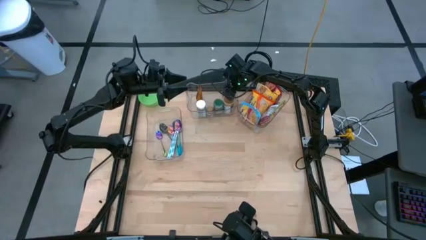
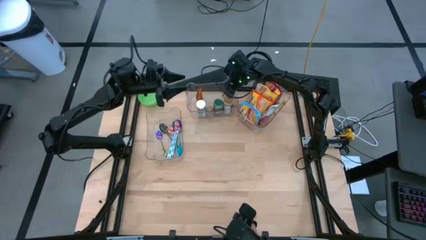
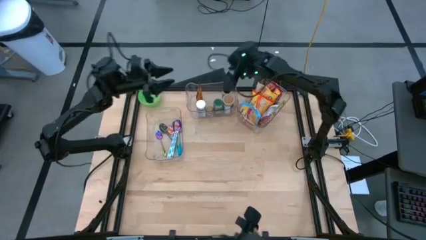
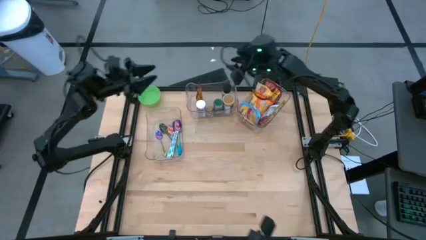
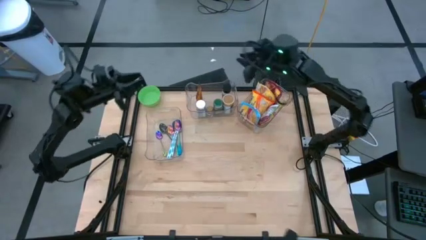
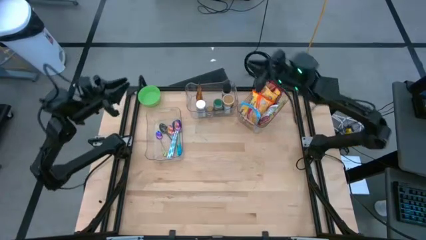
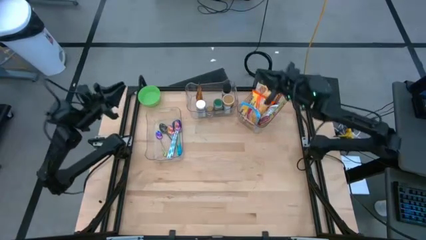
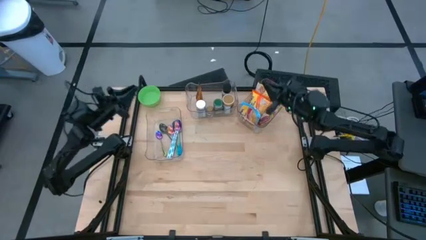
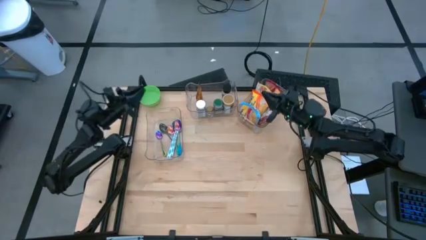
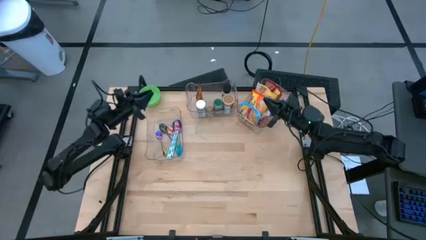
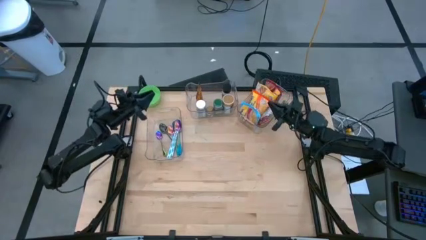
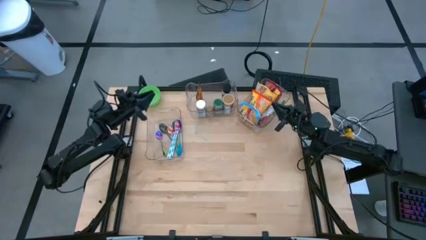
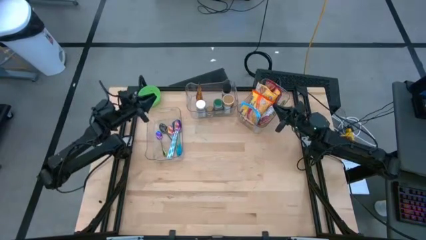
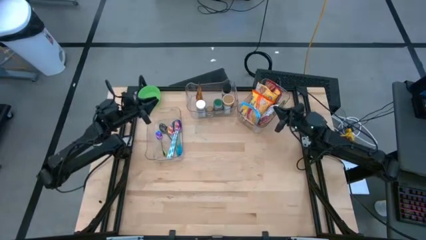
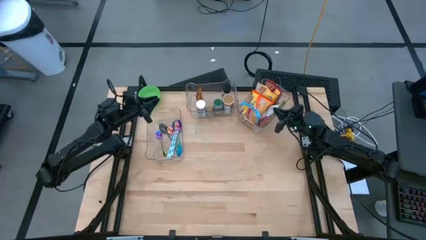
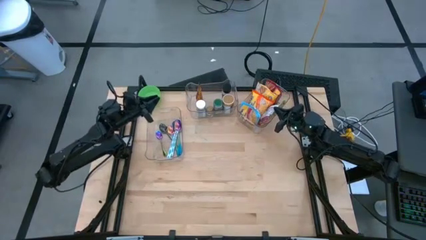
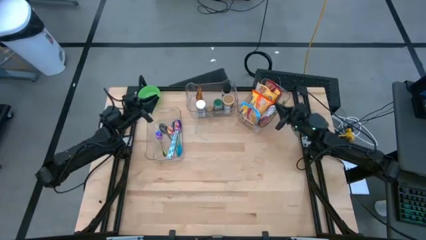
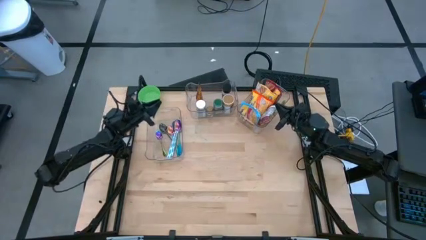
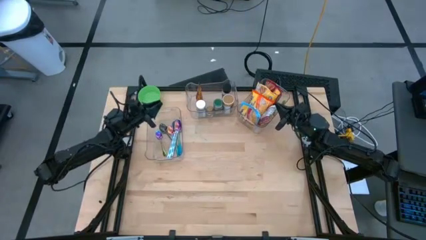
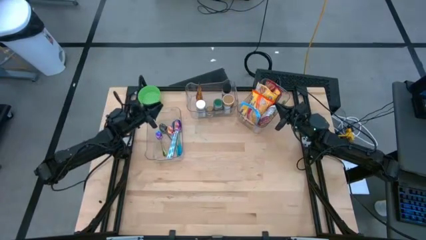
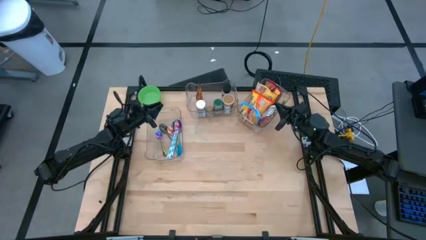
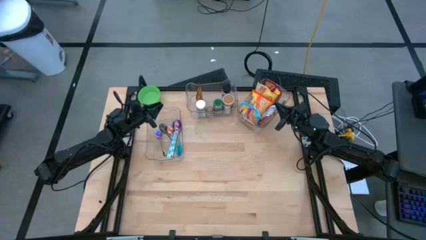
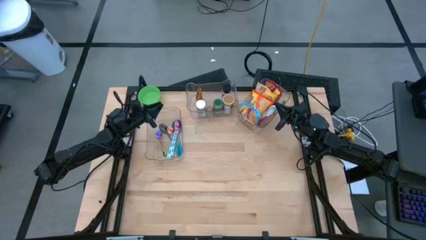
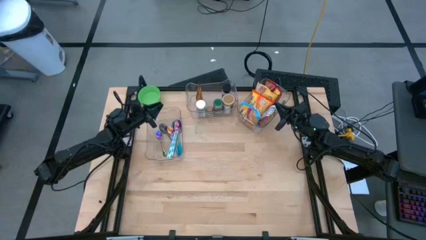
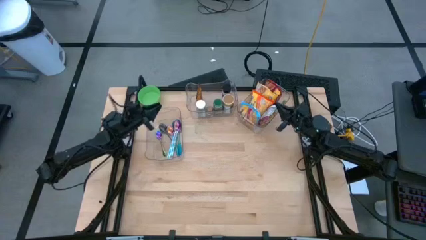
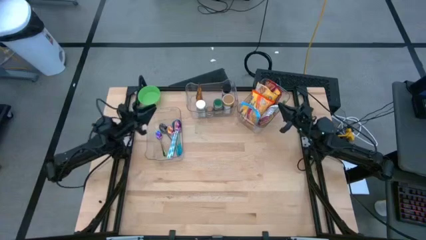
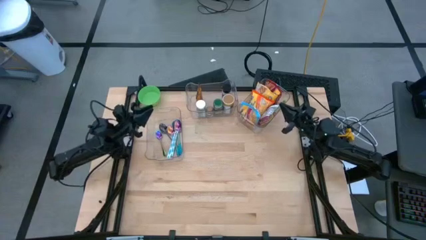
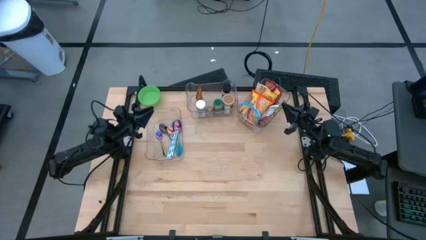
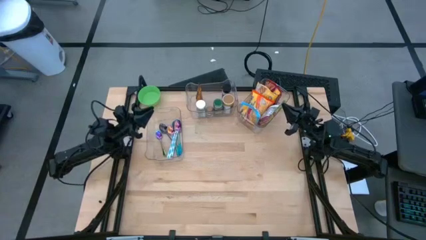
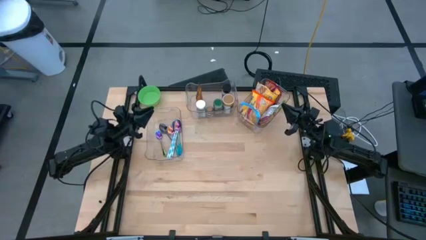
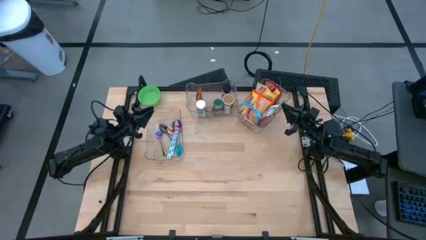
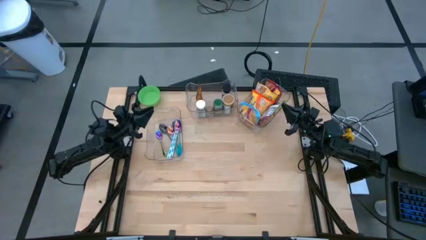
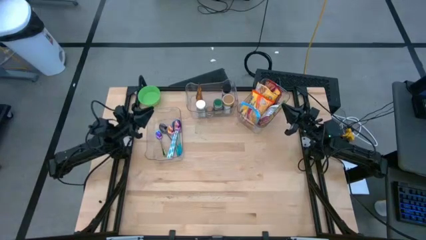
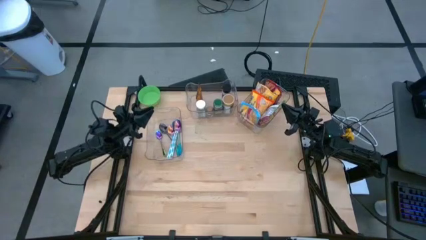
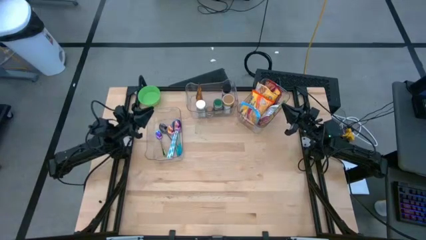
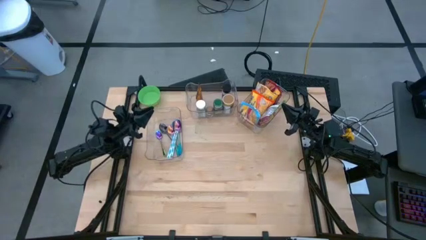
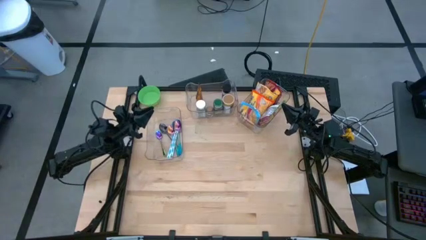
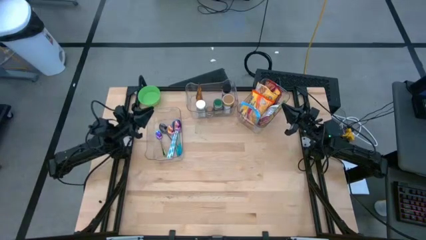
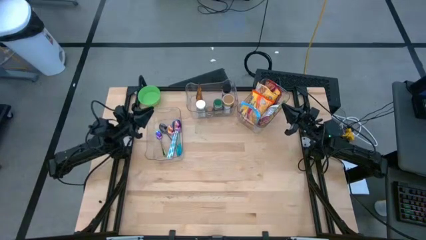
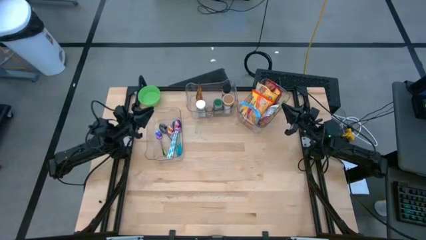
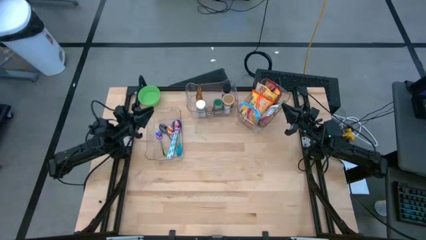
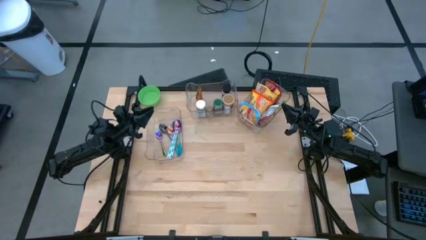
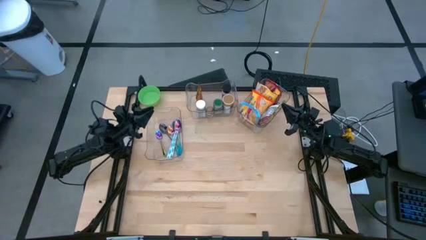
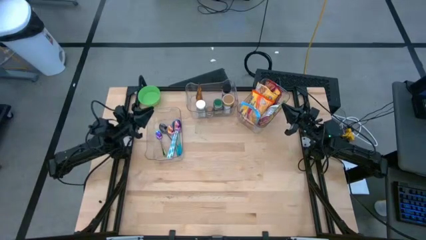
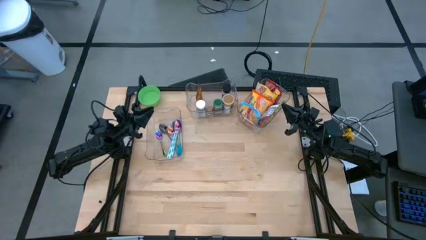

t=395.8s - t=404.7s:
Task: Pick & Place Food Item
Return to Home Position

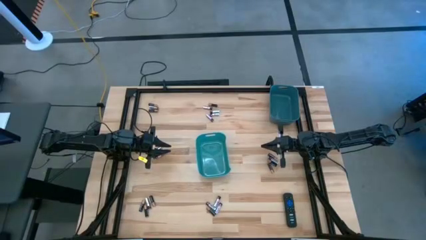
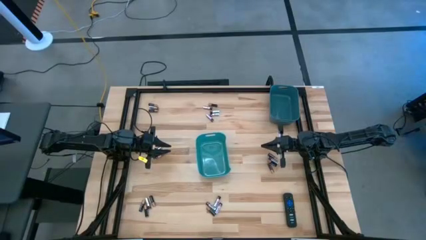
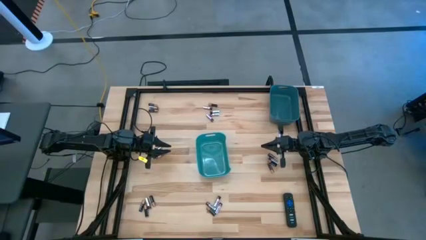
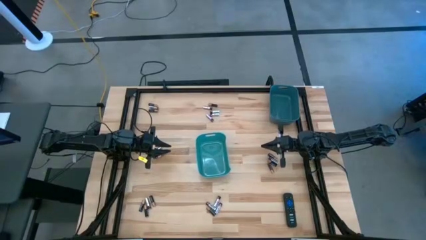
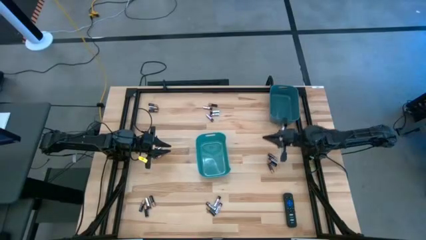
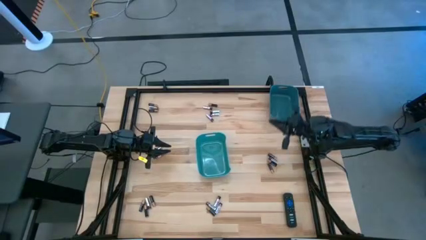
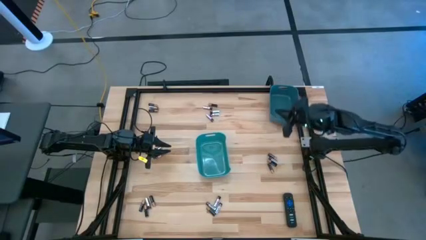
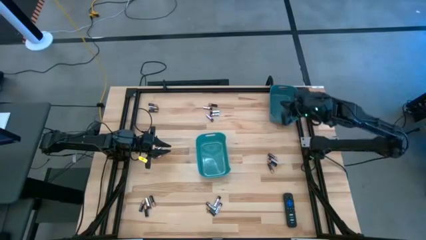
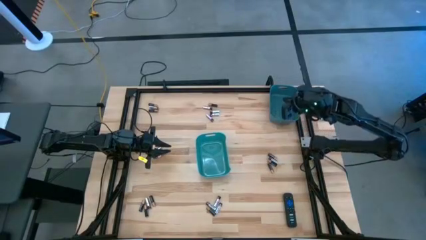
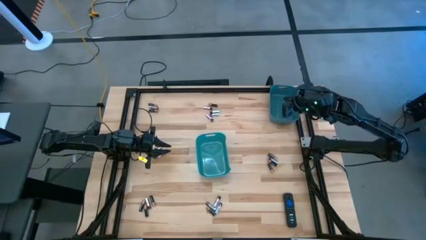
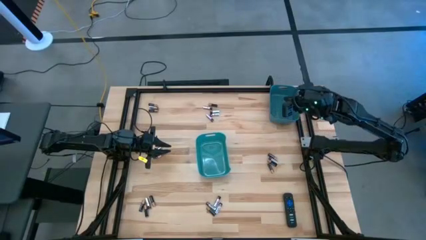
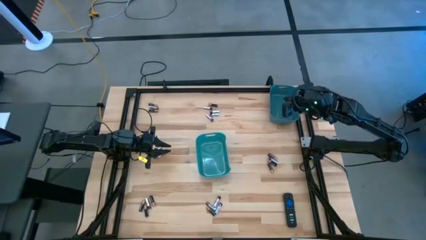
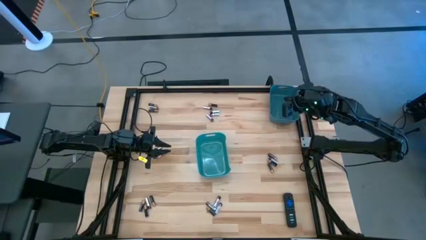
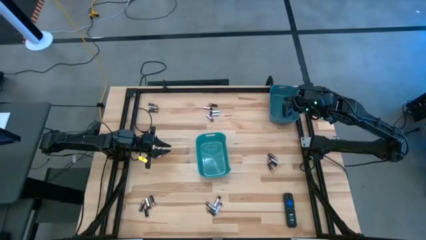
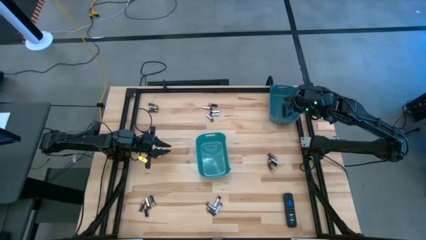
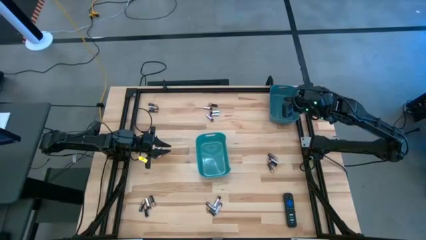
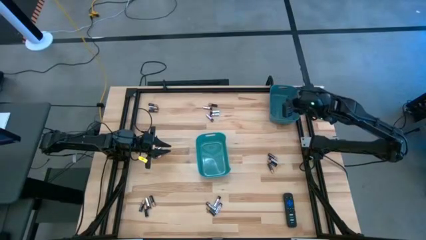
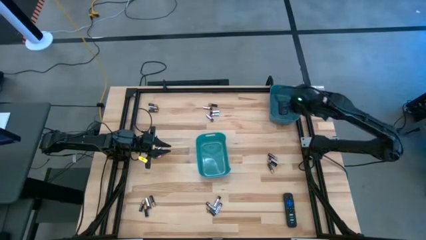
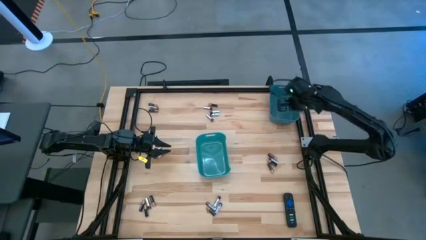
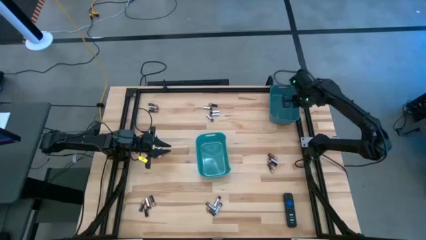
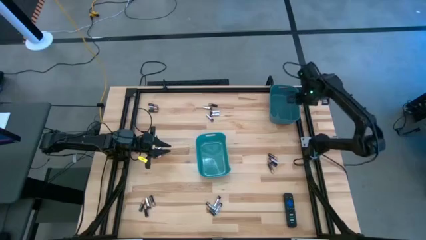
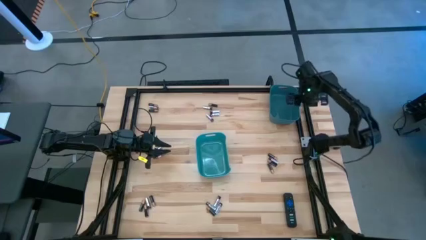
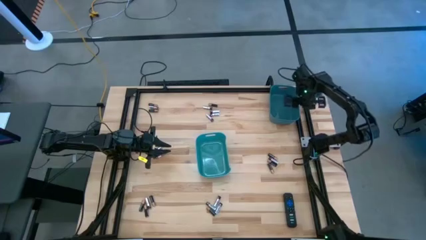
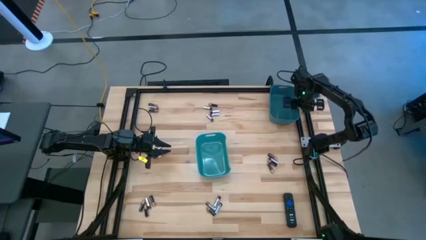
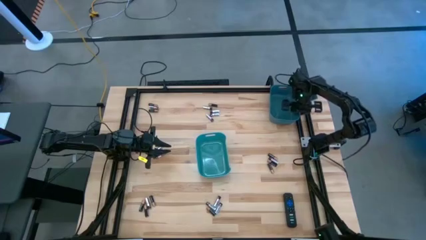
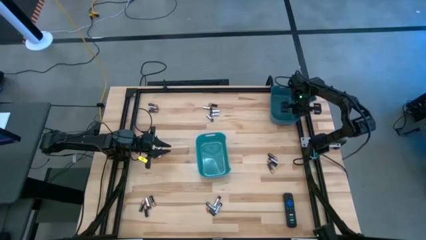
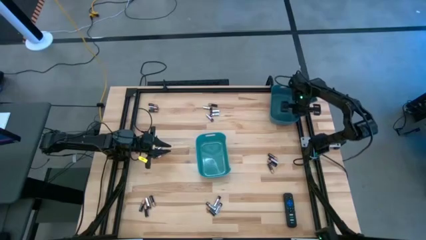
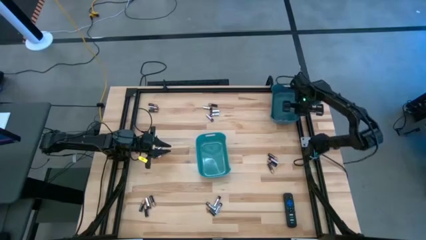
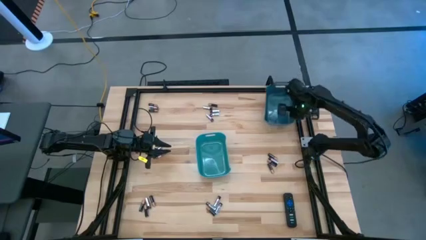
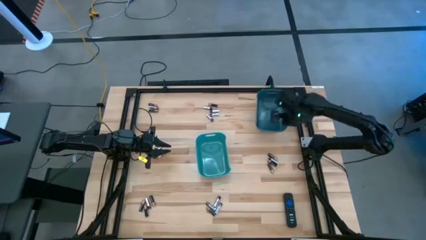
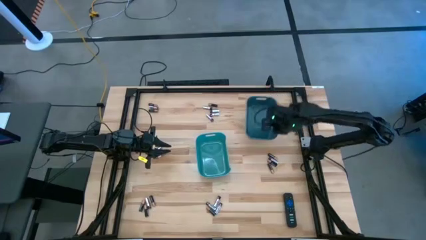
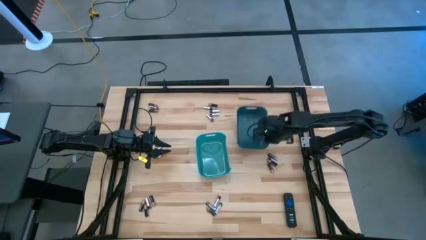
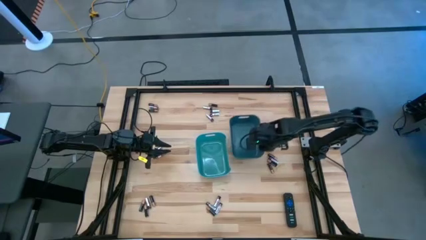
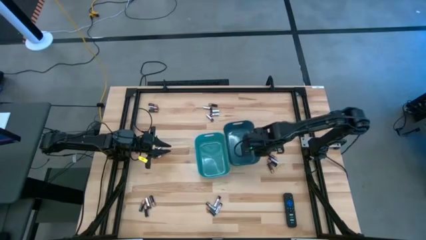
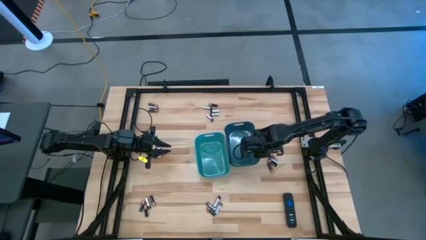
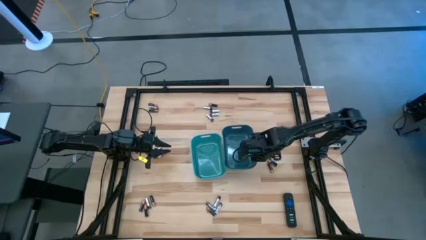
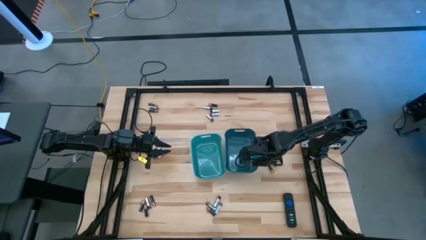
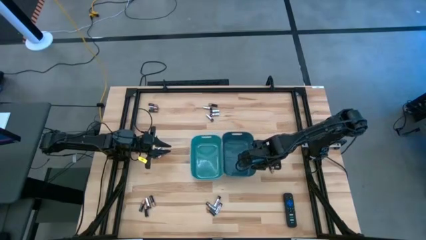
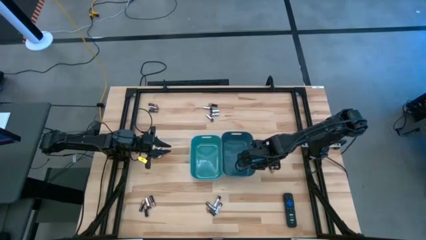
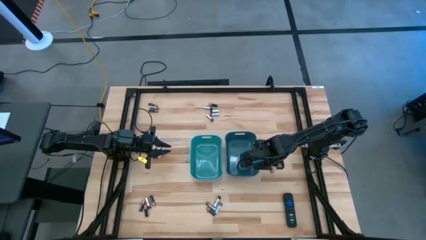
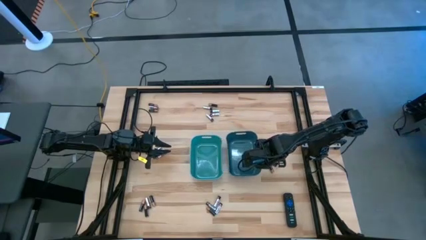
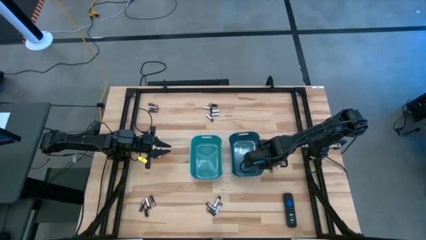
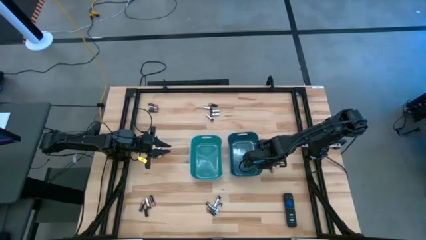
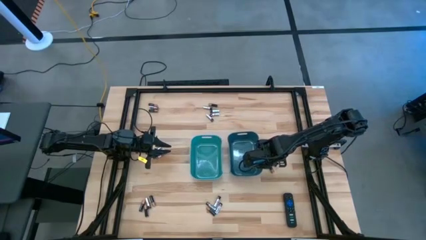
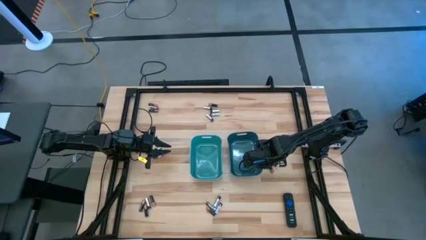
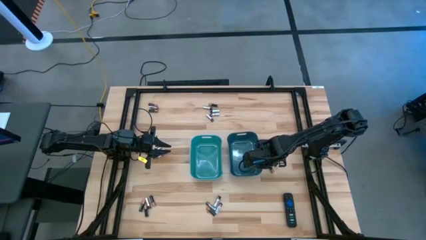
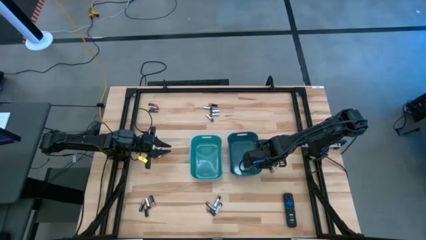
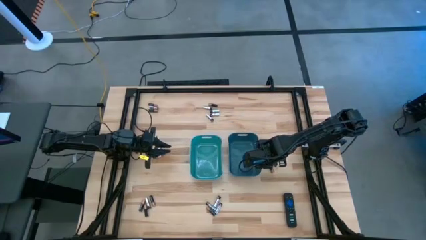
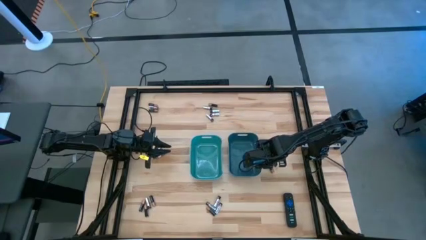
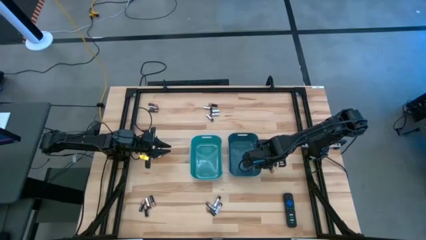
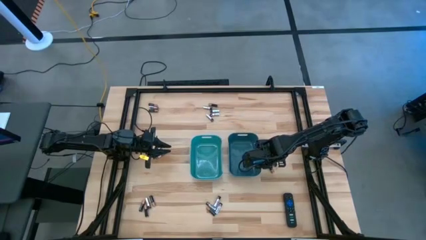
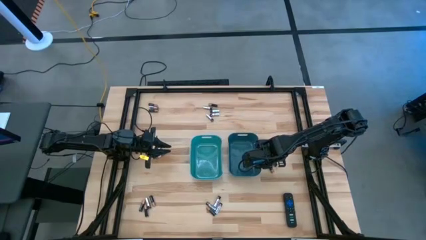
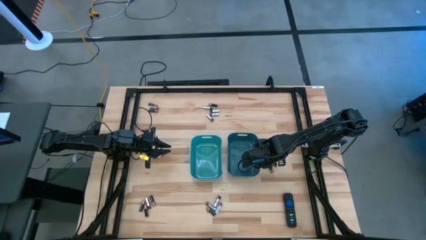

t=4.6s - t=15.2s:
Task: Sort batteries
Move the blue bin to the center
